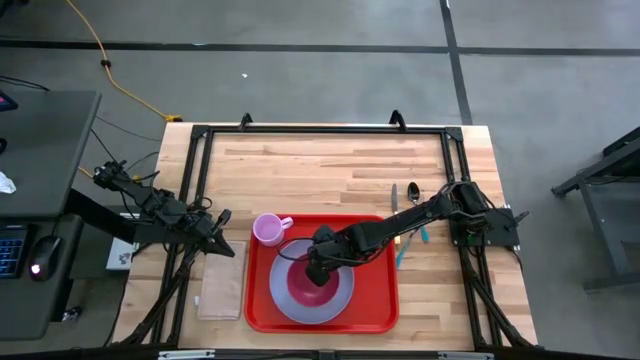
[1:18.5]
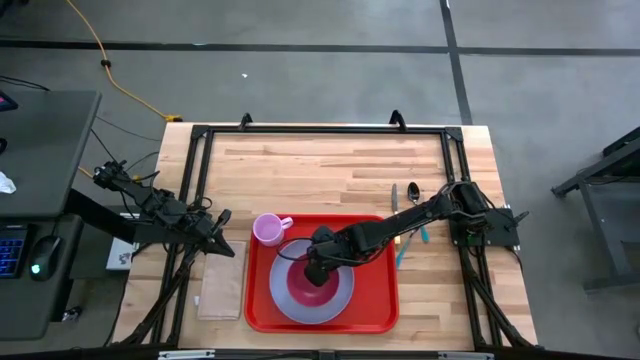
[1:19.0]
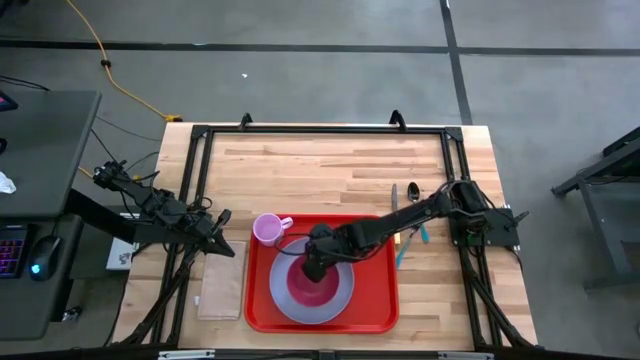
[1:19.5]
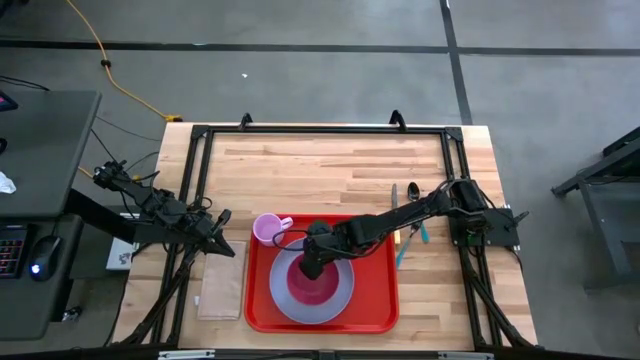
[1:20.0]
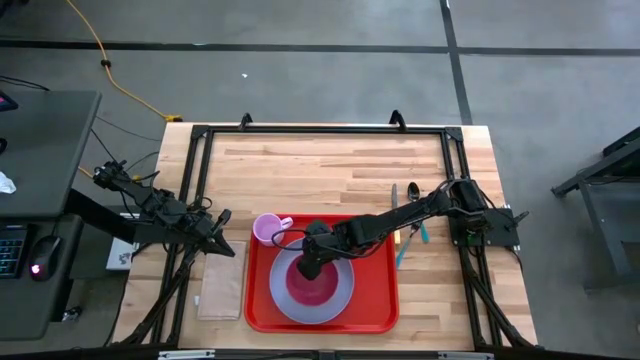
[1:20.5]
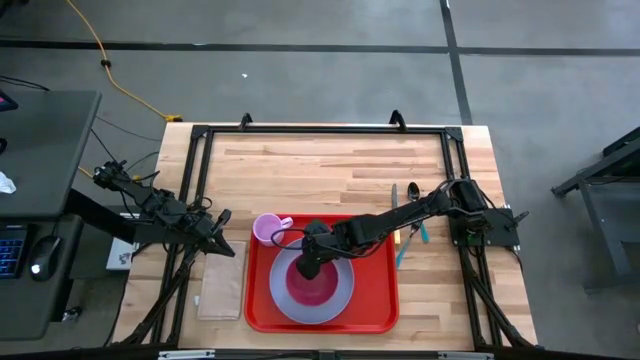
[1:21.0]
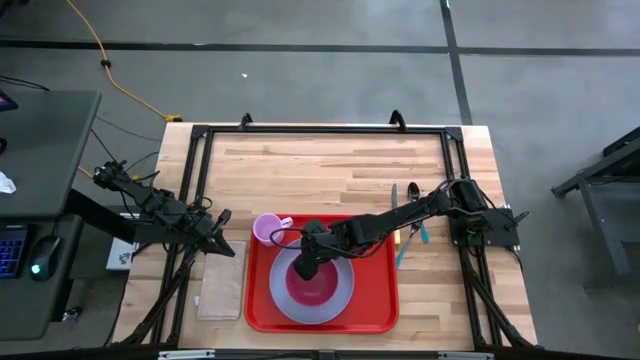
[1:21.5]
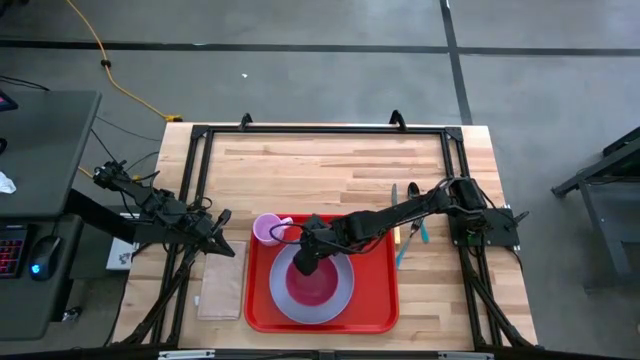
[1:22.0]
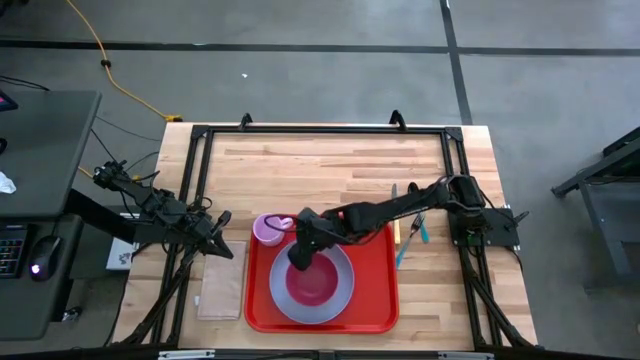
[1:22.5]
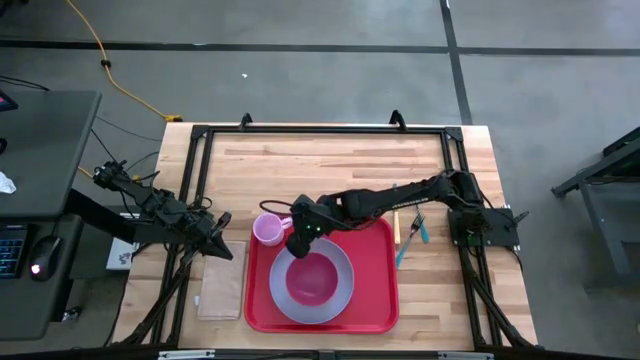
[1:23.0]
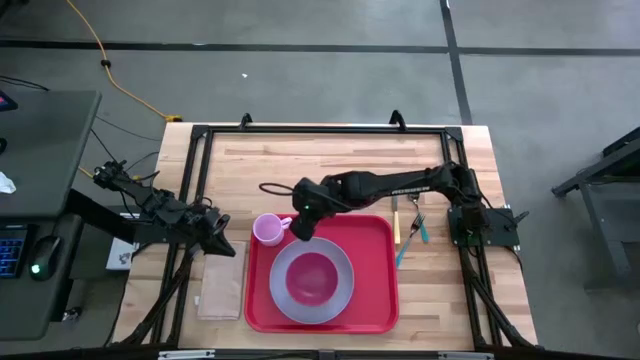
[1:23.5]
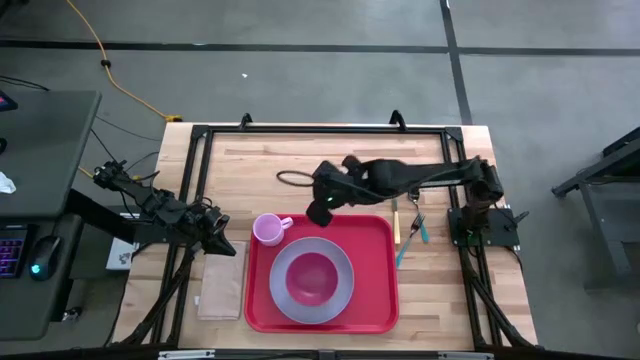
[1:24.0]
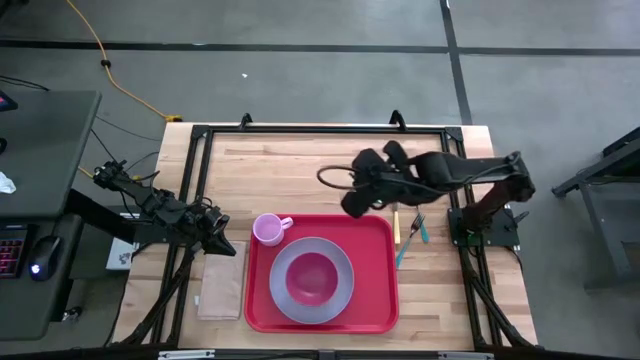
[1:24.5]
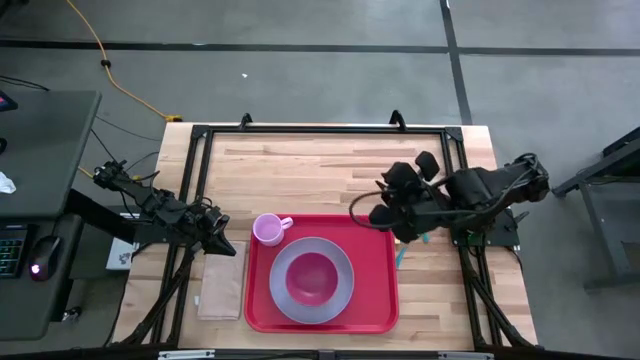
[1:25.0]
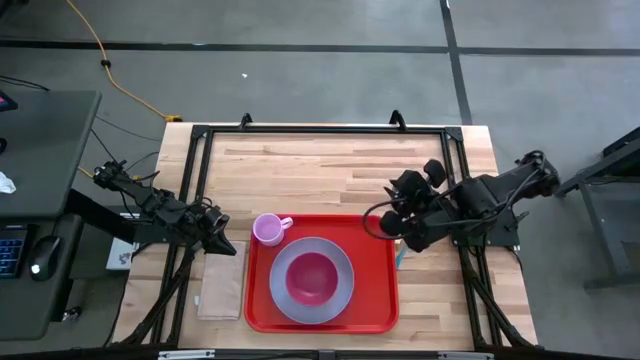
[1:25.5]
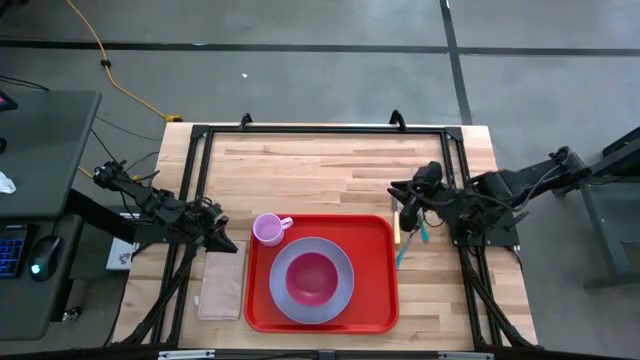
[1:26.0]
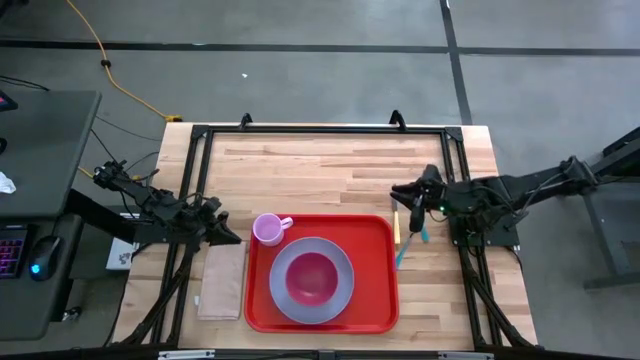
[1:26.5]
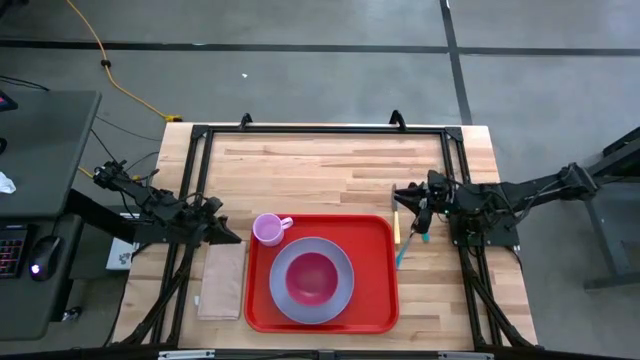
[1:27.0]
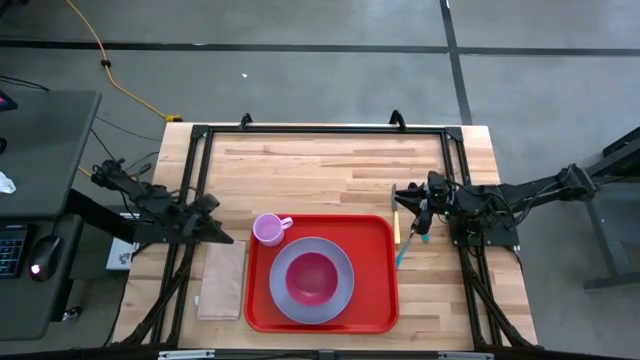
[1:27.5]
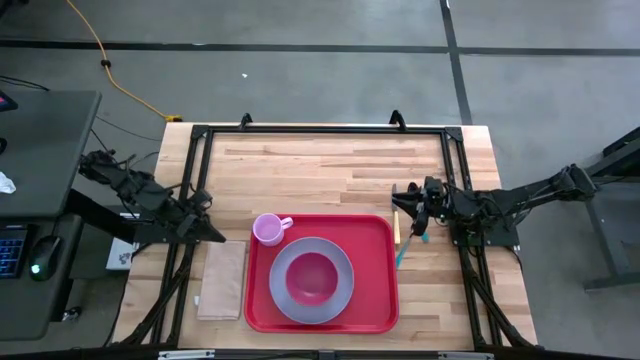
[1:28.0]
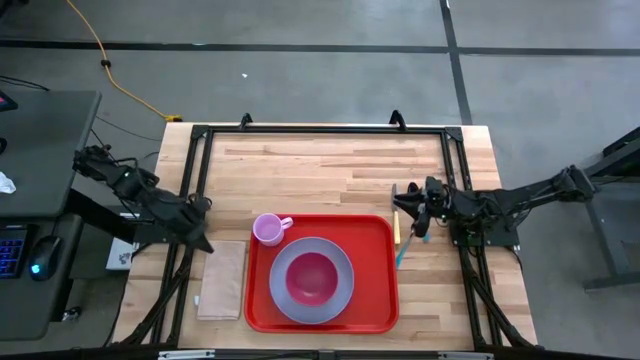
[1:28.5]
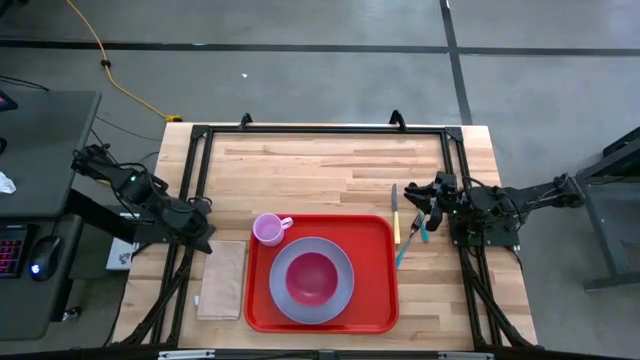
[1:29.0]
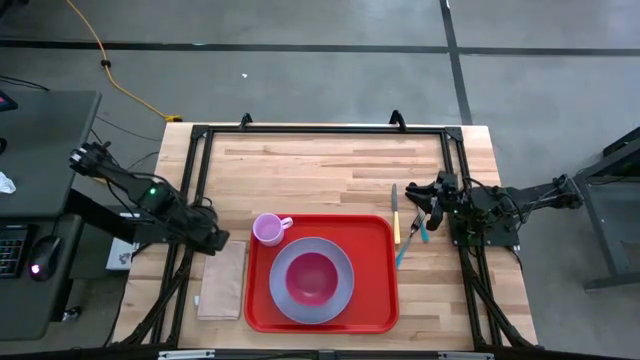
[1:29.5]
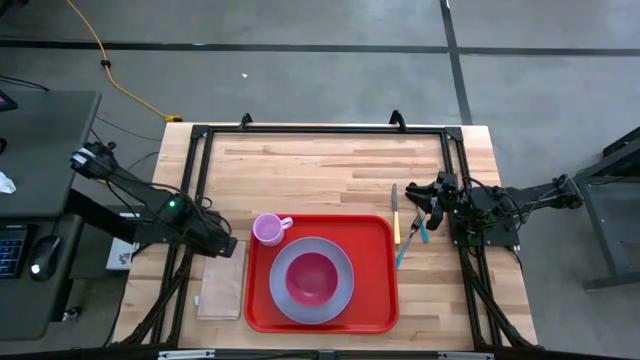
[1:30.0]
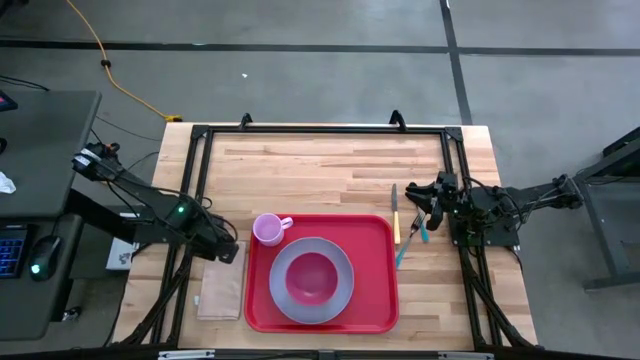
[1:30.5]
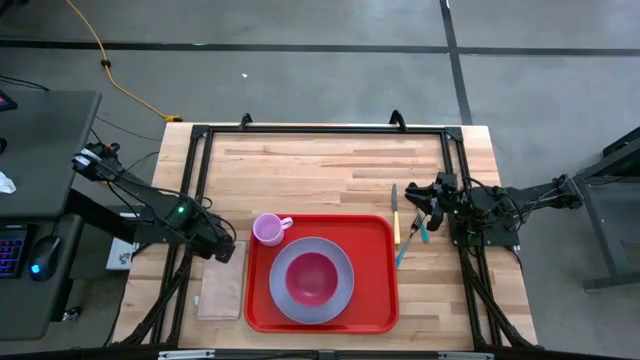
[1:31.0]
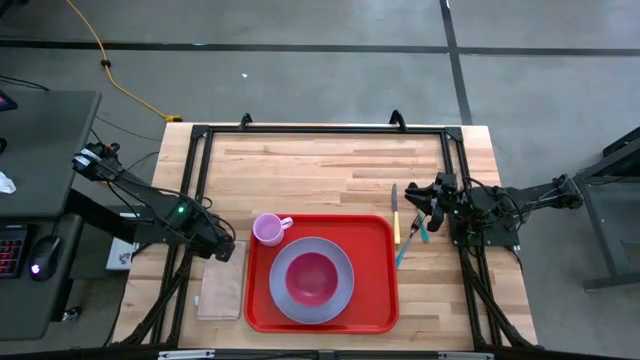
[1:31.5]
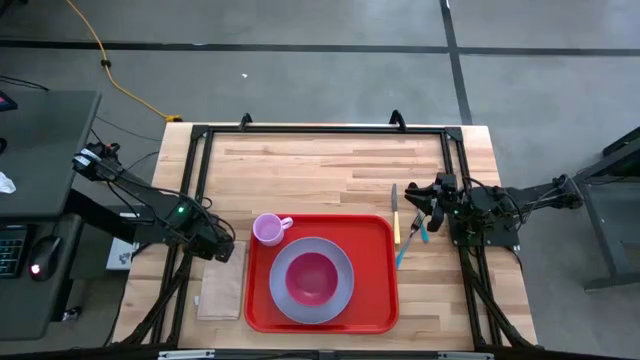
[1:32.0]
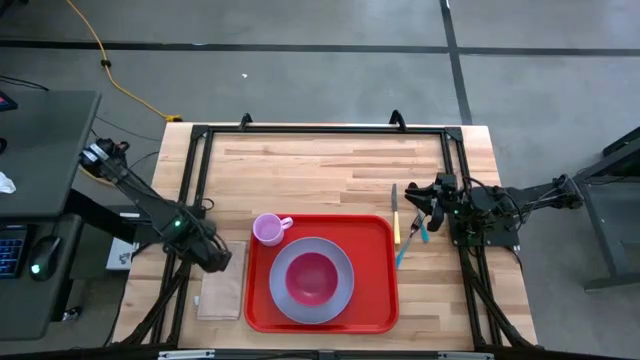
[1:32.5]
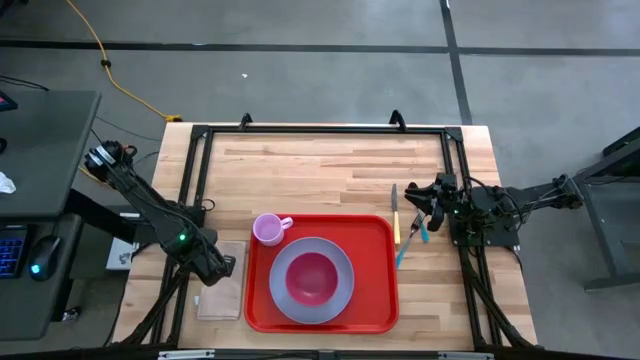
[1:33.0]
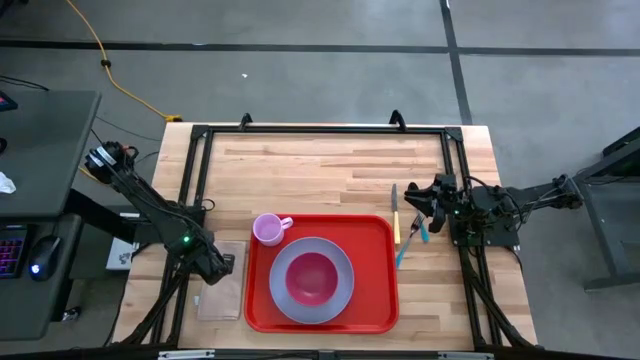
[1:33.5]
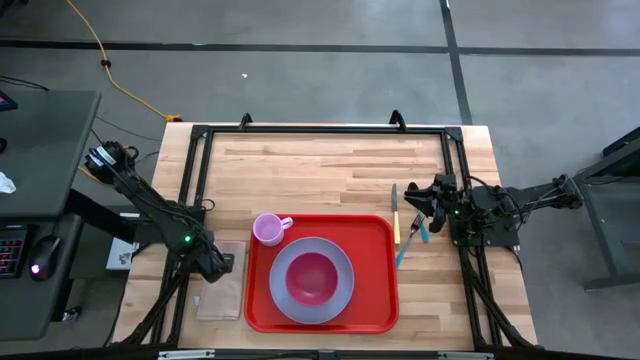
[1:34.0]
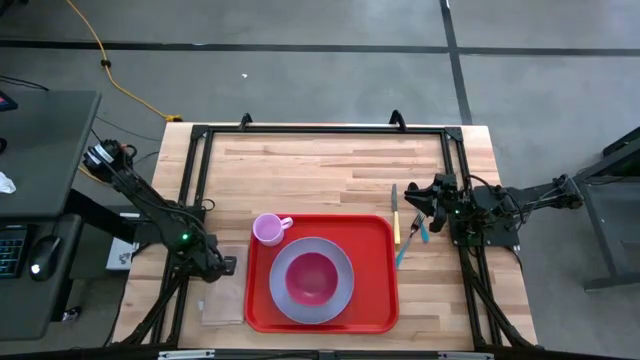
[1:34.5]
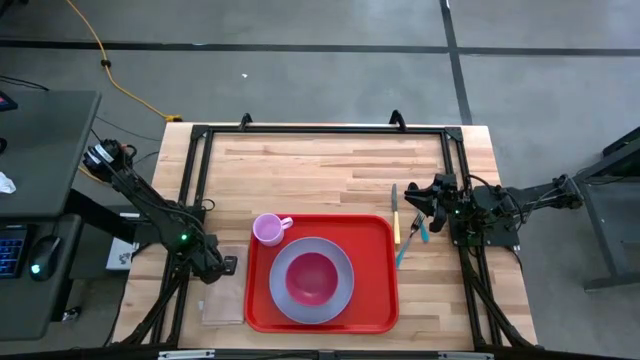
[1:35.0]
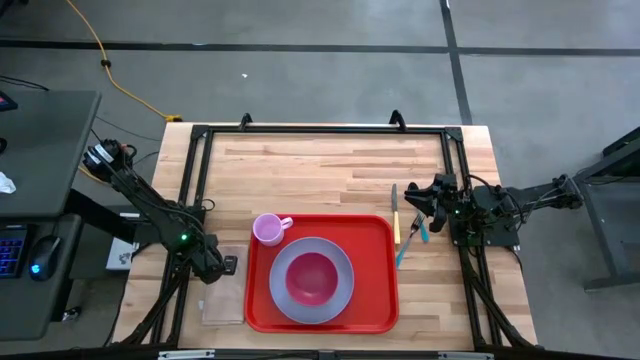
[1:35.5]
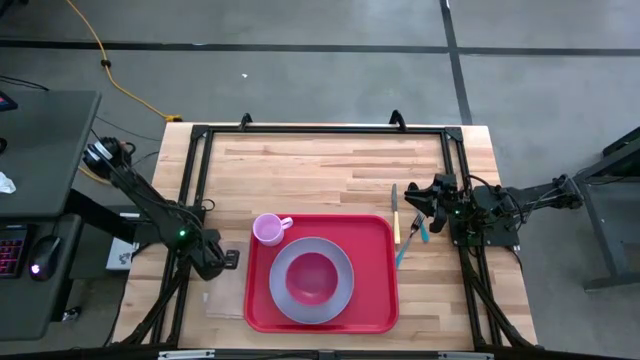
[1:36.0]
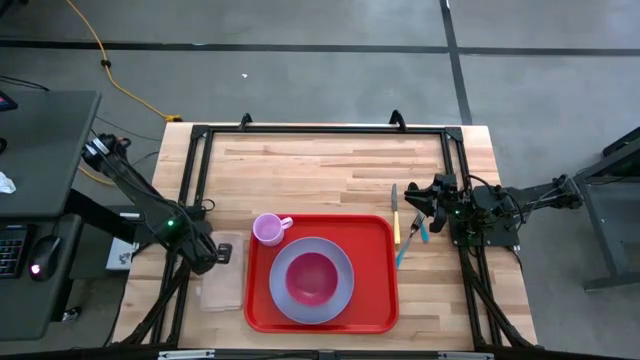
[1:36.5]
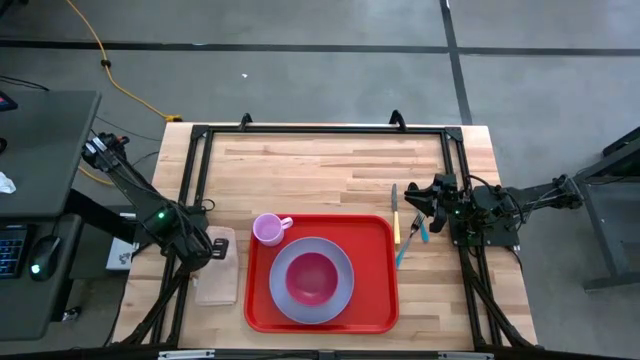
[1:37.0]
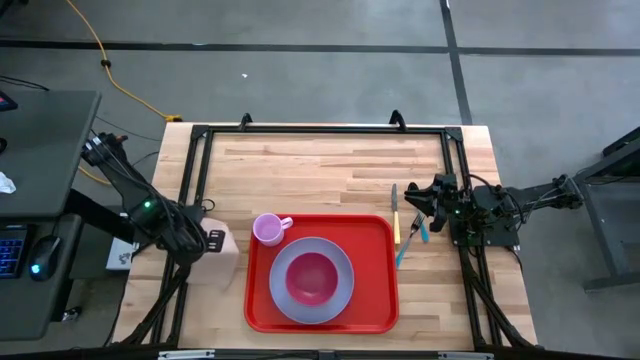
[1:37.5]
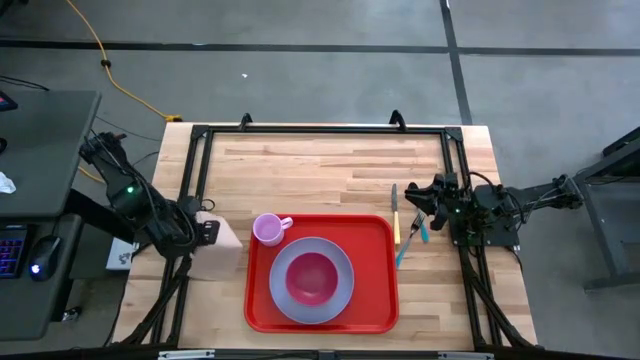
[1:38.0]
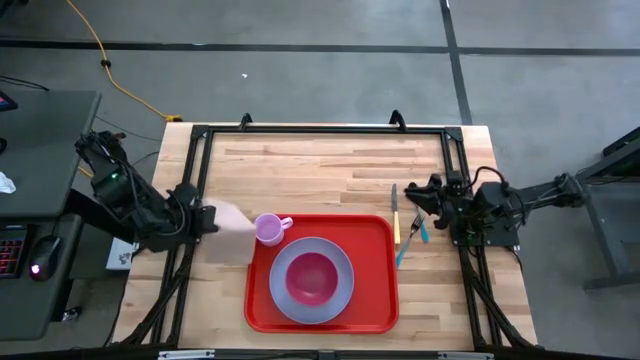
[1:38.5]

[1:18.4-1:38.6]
Task: Set up tray
Put the brown table napkin on the red serving tray to the right of the purple plate
